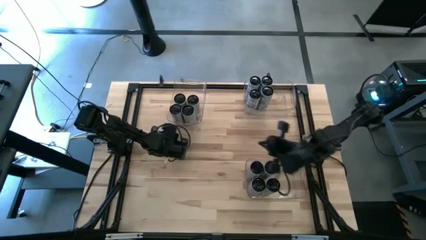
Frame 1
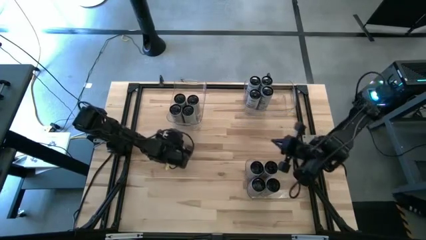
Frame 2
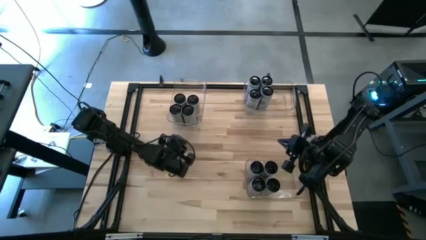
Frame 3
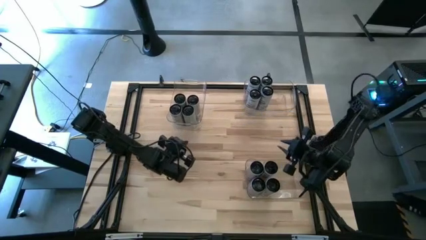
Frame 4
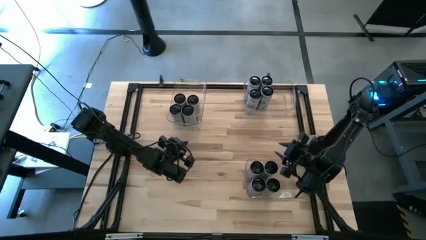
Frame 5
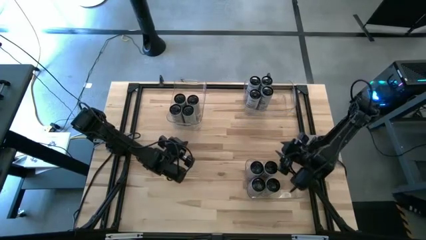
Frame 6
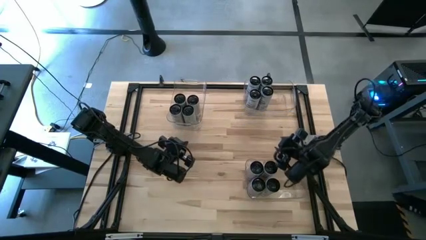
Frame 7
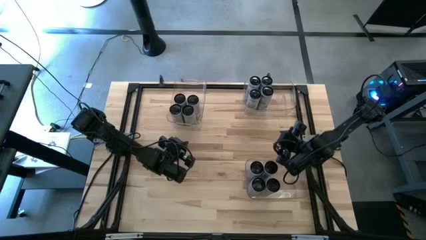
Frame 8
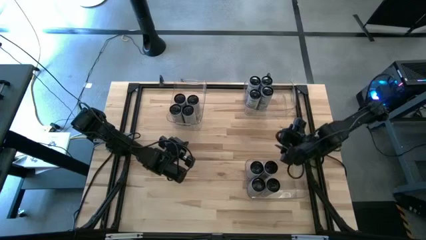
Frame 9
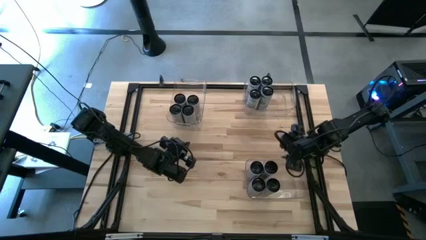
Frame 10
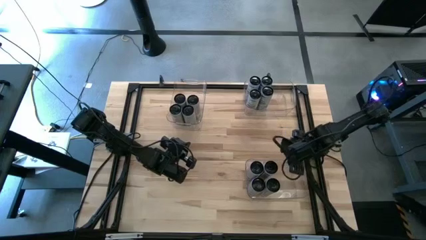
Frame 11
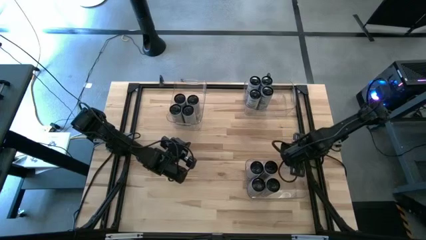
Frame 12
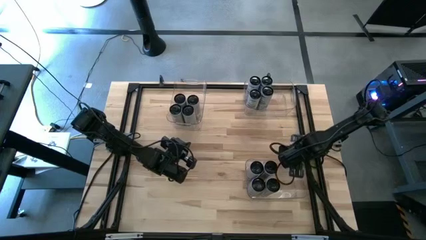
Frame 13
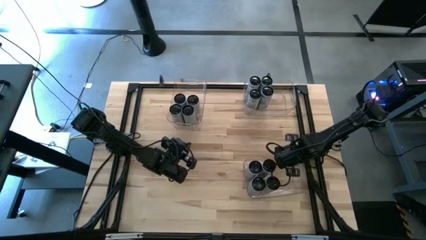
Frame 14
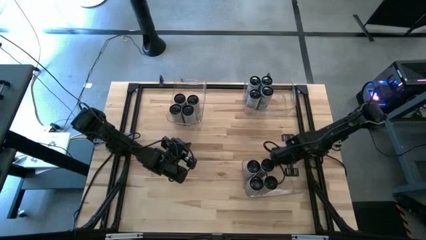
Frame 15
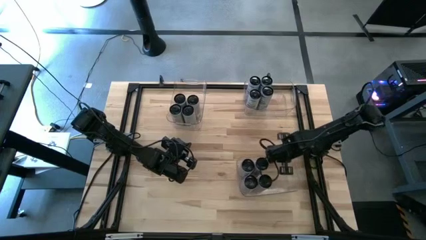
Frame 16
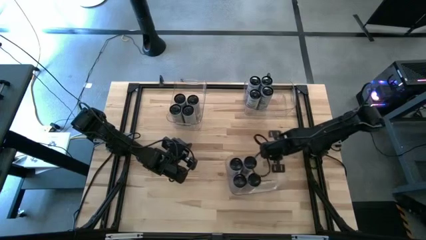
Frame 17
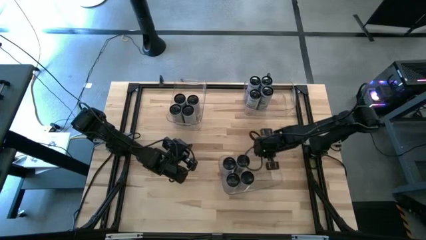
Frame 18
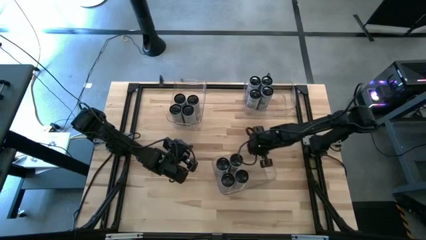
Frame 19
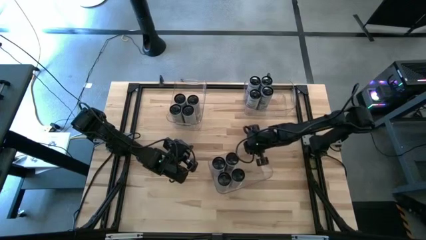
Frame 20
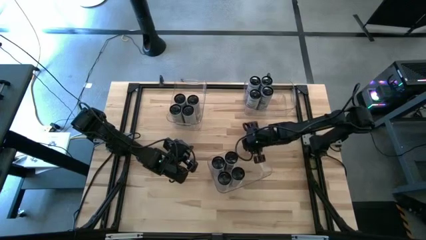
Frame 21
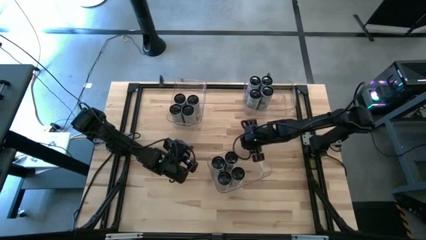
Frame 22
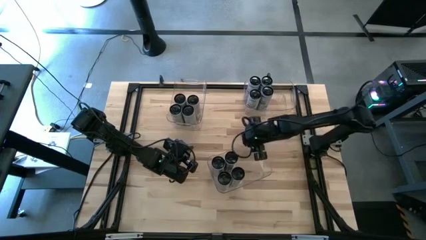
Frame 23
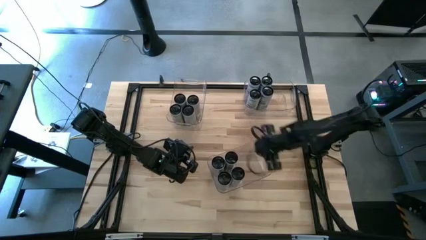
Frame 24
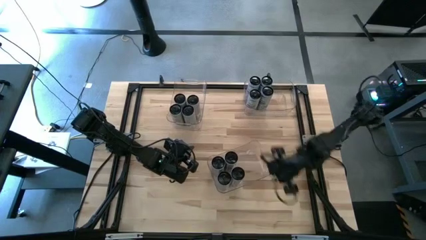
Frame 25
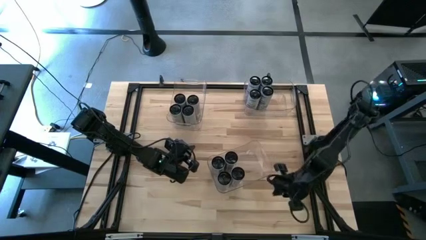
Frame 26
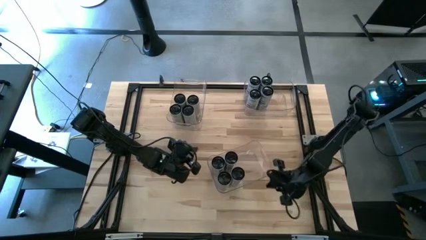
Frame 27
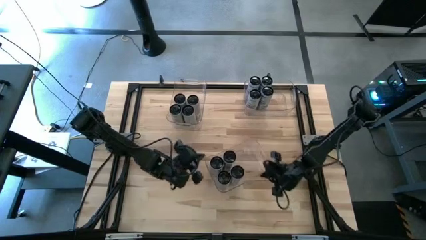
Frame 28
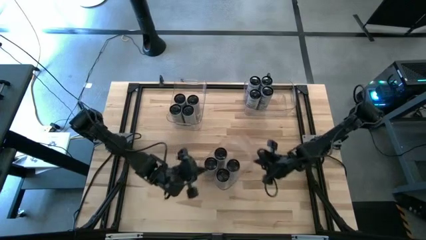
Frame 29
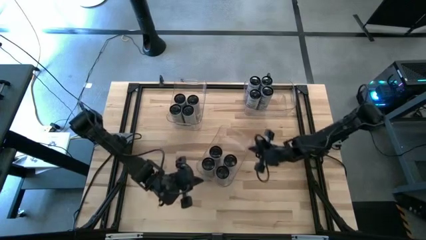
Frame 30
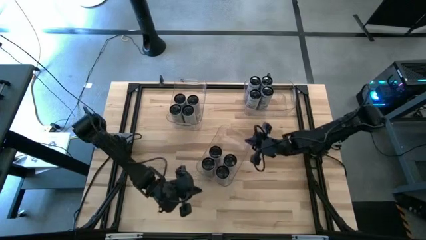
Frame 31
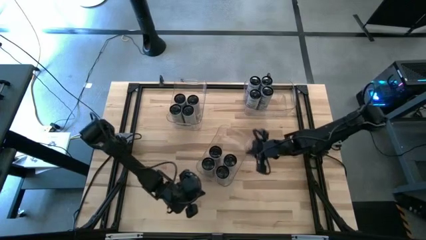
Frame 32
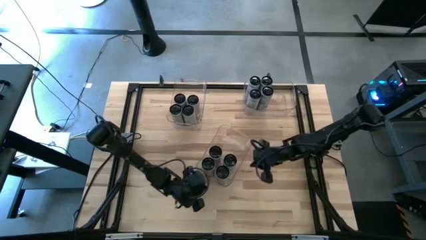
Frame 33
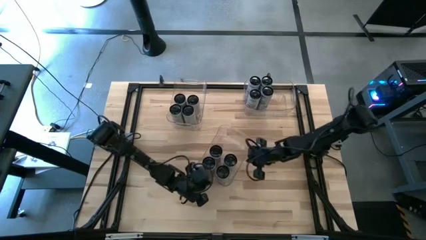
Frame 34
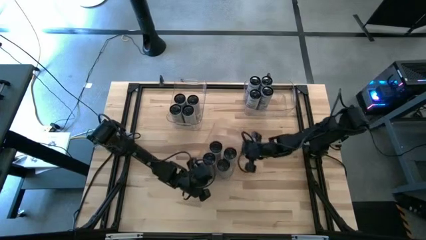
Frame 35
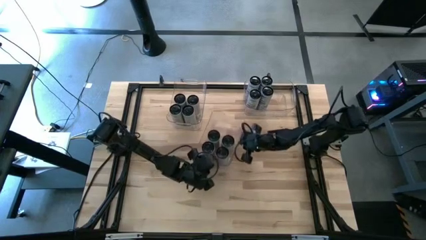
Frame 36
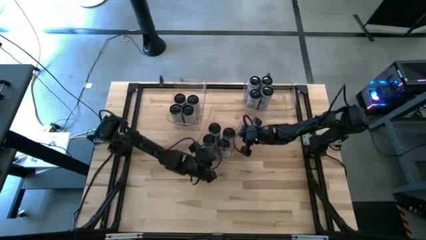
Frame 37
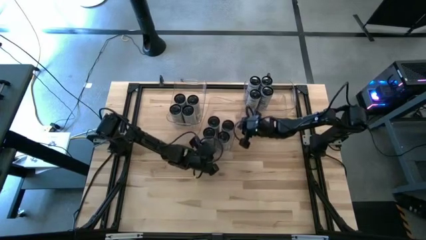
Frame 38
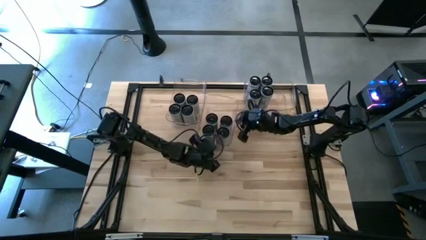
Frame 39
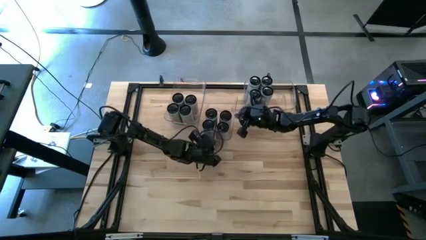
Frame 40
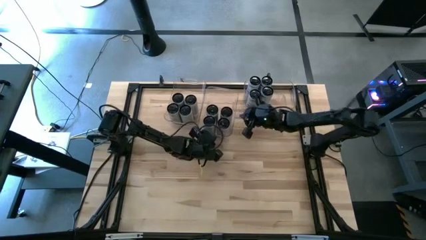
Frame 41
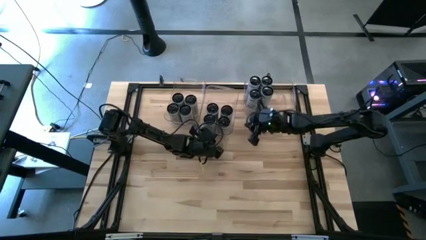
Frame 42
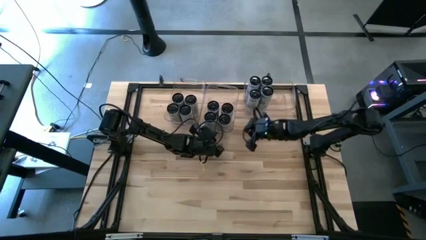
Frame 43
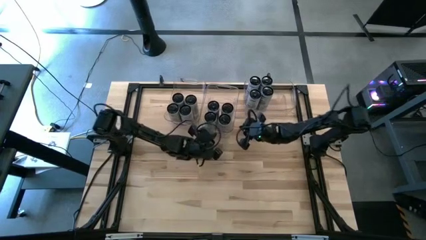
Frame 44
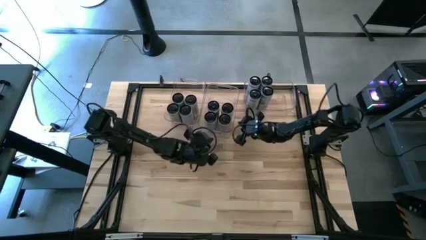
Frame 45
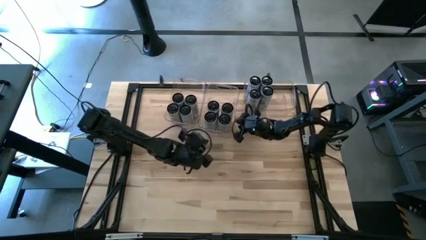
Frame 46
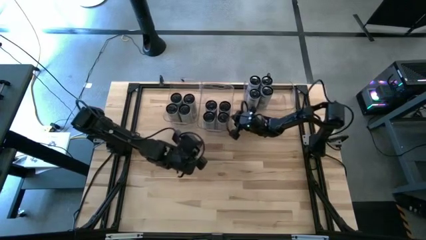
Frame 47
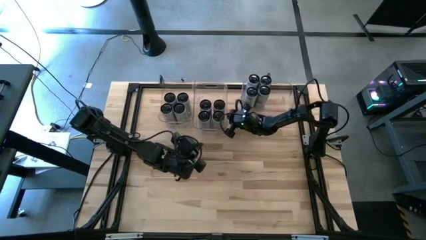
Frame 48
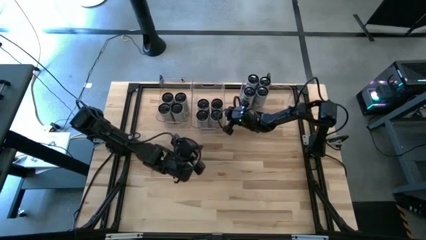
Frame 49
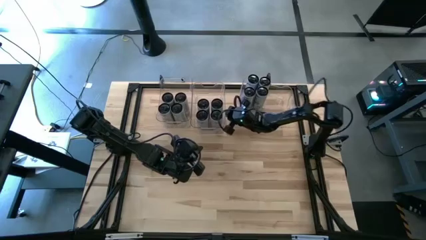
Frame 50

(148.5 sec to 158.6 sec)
Task: Sort soda cans
Move the bottom right transparent bin to the top center of the table

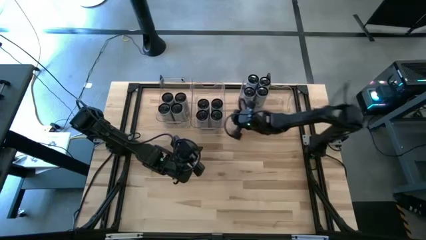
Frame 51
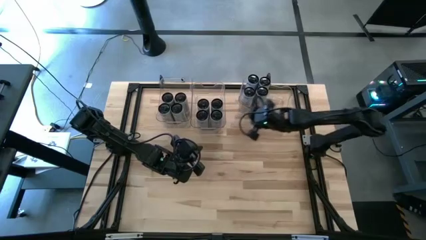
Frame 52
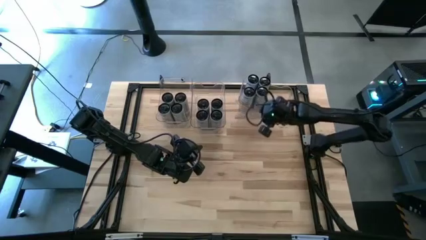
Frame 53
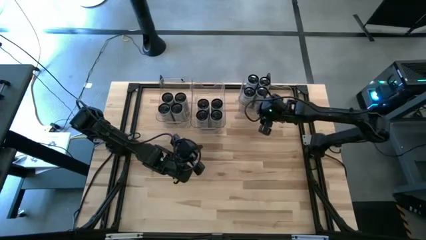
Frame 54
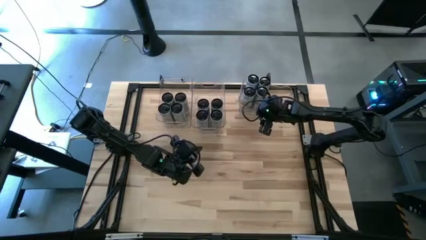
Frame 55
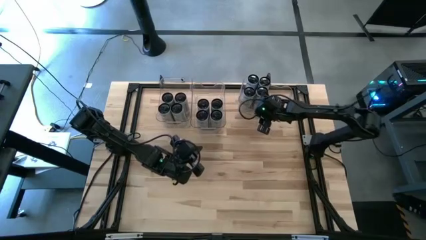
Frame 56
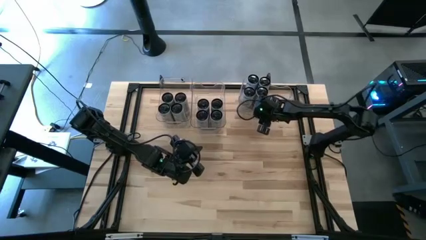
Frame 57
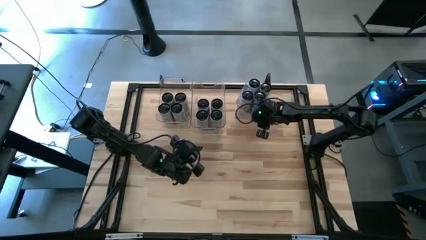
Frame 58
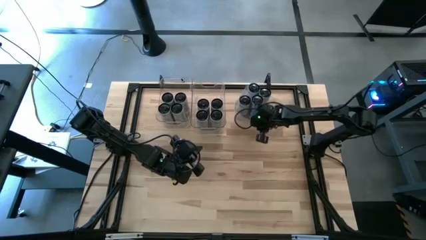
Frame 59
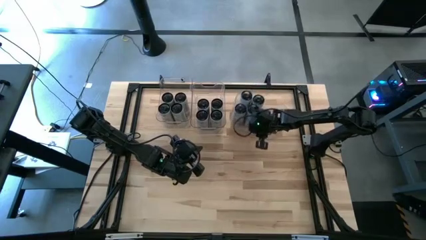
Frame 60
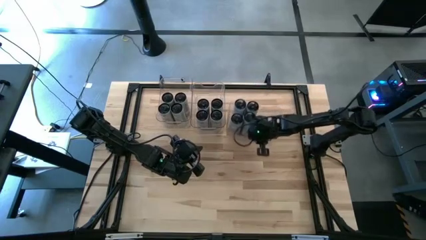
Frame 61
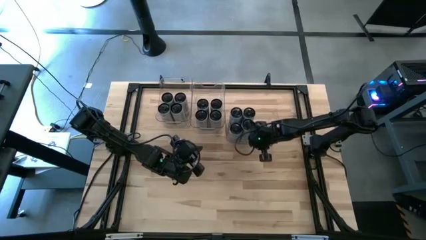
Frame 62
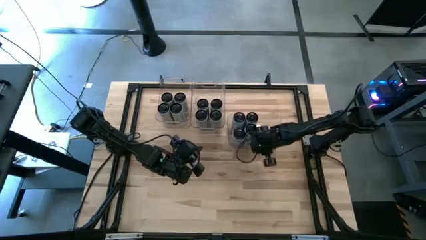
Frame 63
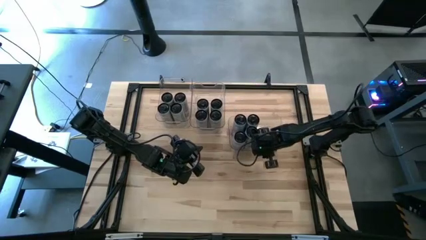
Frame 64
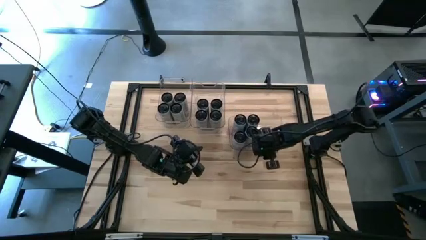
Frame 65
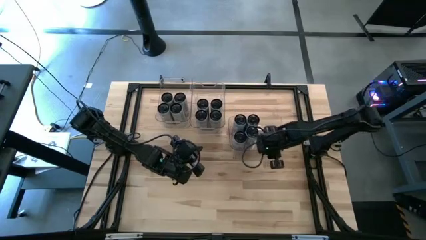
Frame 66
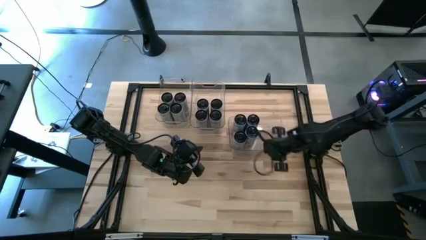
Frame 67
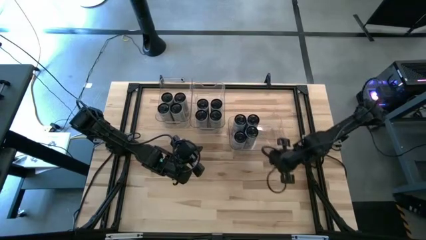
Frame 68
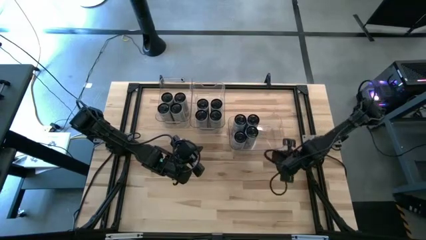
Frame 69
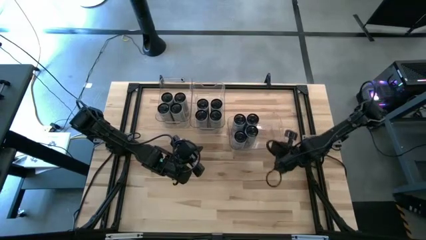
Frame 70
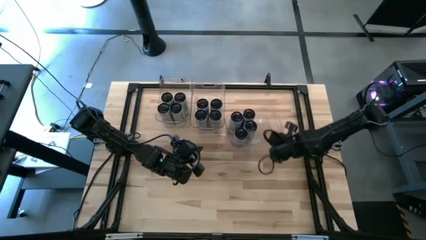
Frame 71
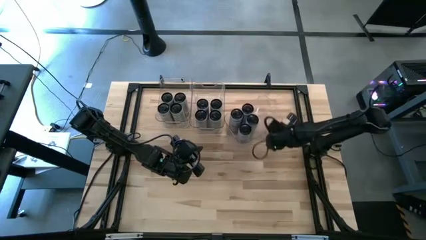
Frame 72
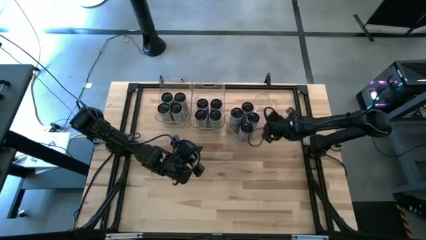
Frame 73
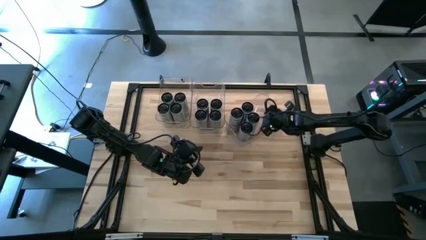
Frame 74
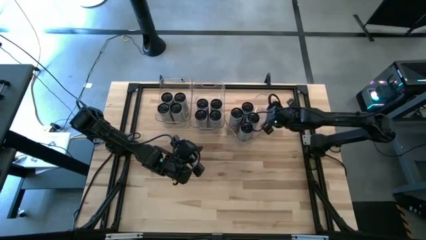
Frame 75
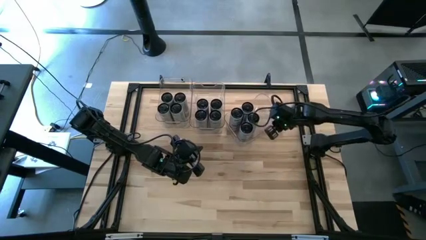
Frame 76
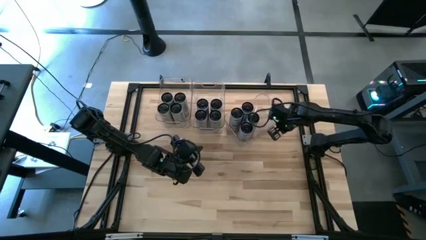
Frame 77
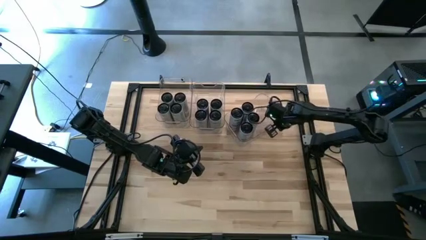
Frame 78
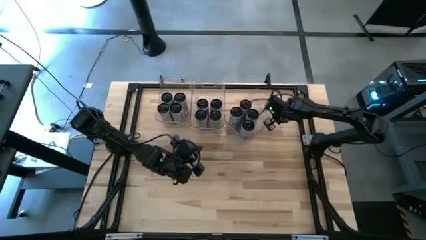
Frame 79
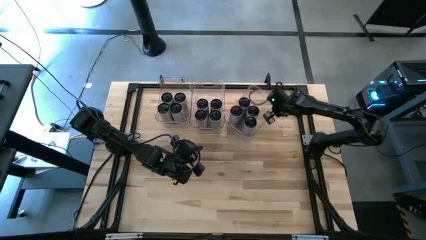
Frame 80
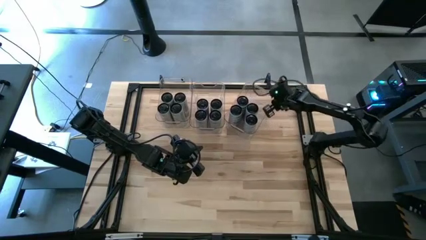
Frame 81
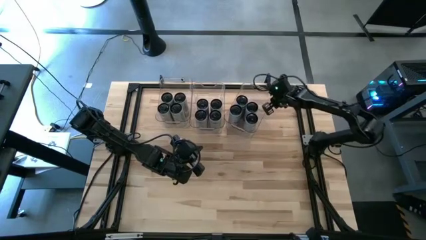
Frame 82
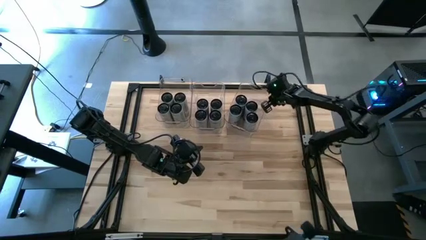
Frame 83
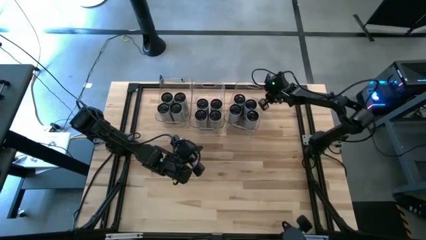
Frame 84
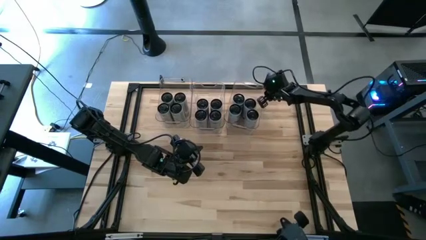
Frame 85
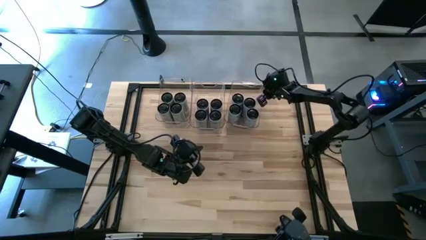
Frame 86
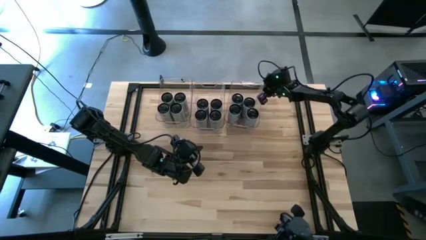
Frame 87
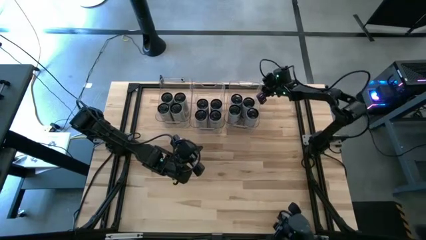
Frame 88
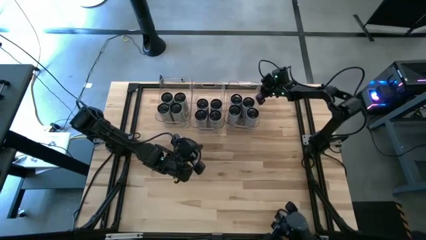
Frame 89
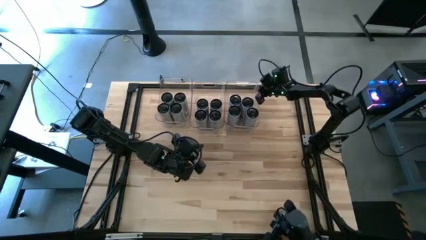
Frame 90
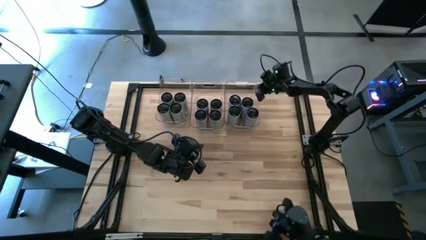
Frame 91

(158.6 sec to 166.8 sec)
Adjust the right transparent bin
